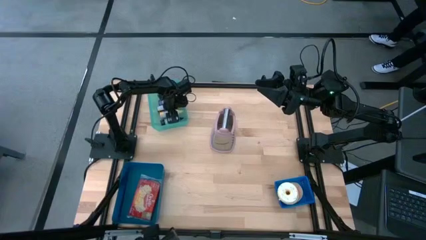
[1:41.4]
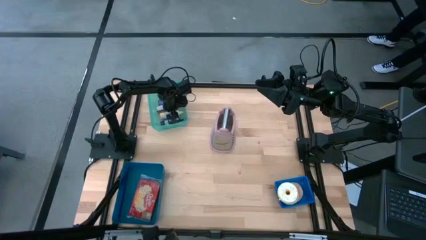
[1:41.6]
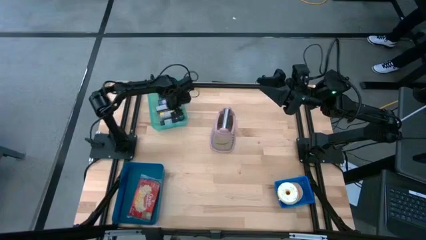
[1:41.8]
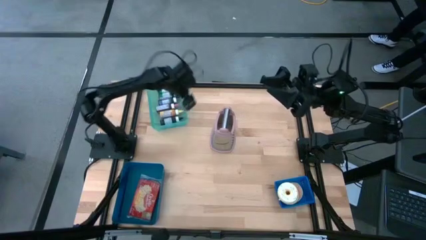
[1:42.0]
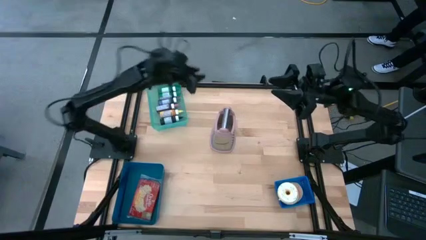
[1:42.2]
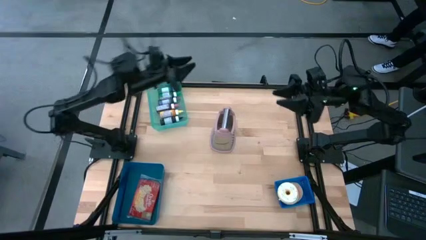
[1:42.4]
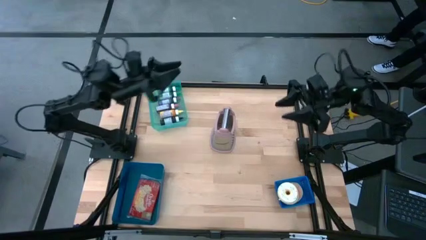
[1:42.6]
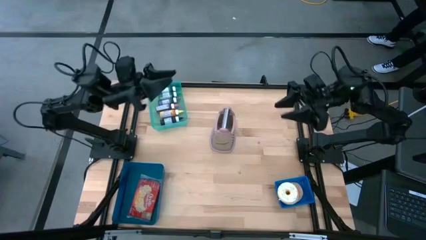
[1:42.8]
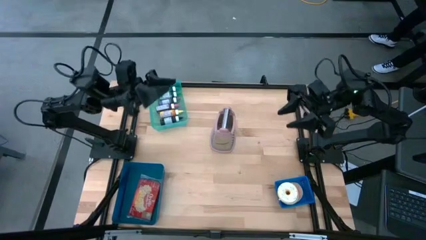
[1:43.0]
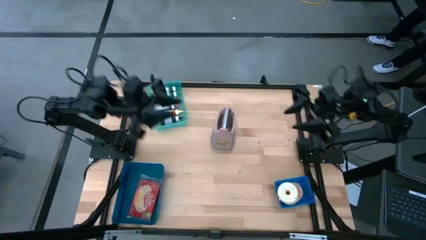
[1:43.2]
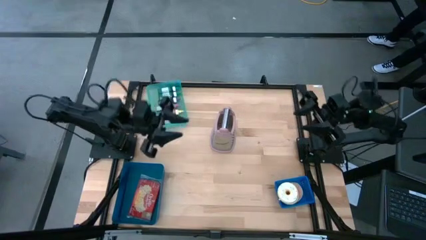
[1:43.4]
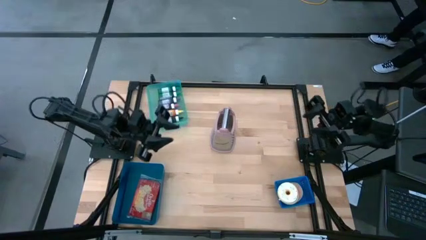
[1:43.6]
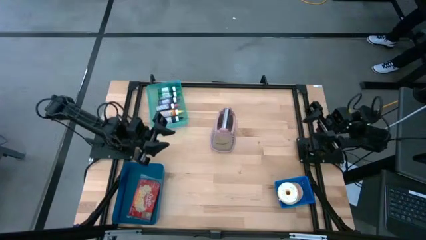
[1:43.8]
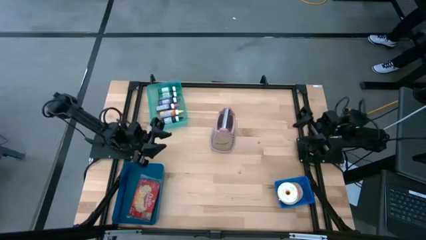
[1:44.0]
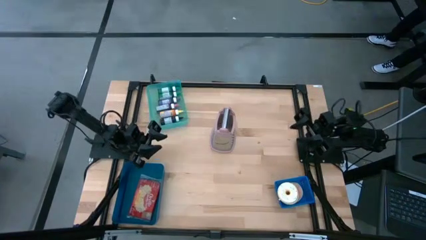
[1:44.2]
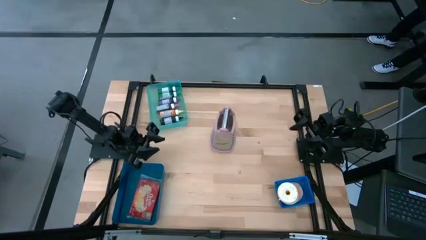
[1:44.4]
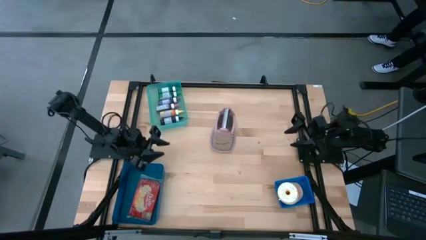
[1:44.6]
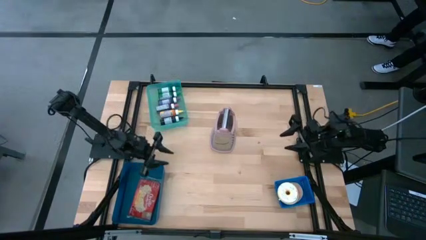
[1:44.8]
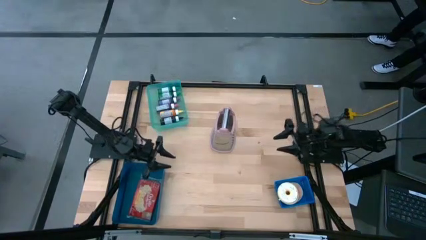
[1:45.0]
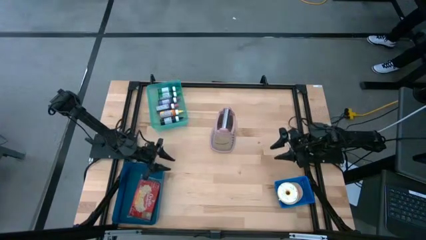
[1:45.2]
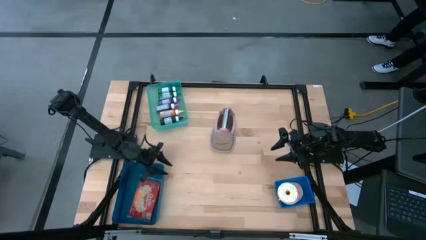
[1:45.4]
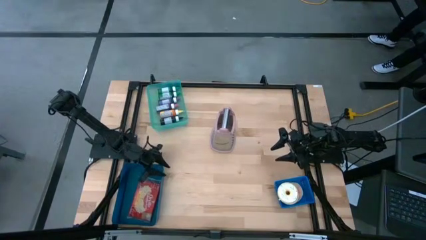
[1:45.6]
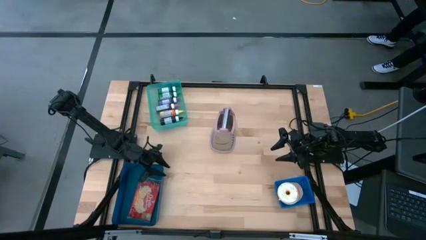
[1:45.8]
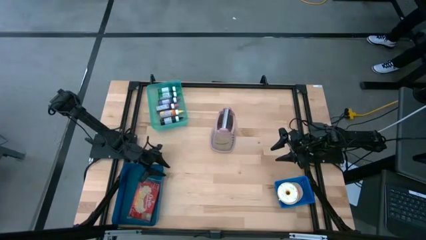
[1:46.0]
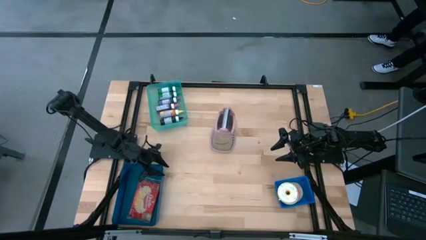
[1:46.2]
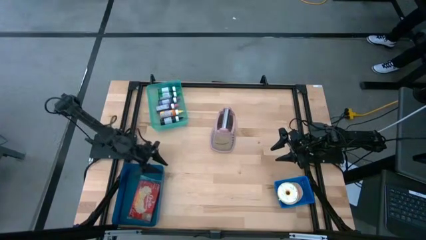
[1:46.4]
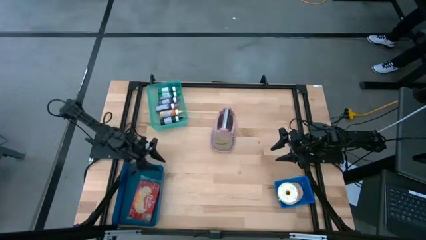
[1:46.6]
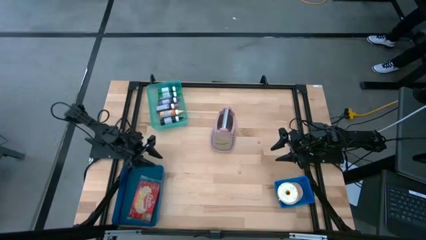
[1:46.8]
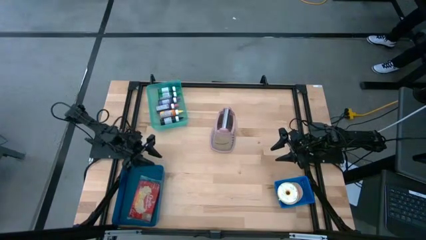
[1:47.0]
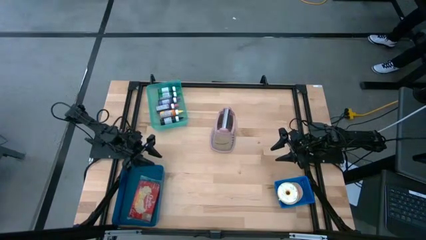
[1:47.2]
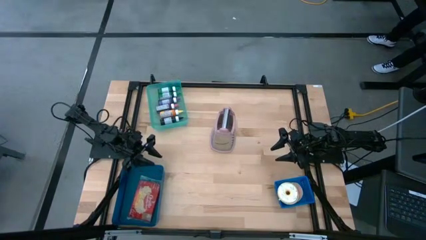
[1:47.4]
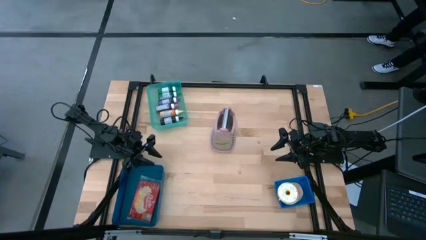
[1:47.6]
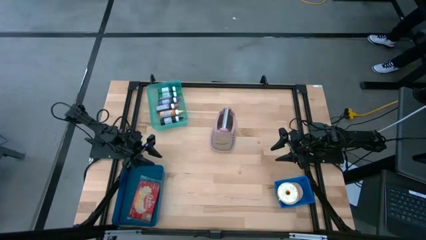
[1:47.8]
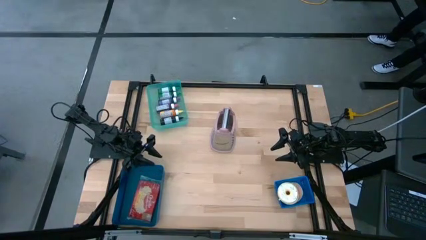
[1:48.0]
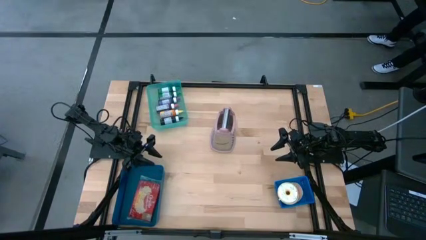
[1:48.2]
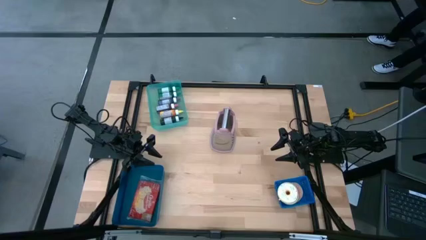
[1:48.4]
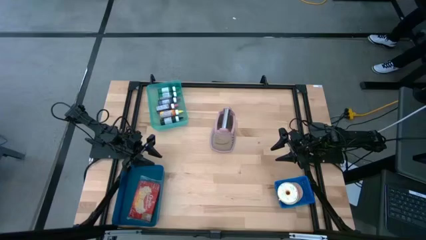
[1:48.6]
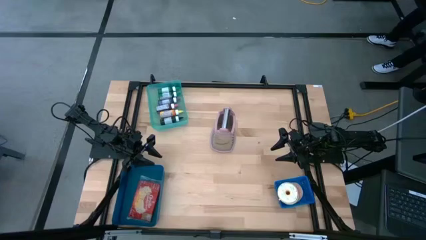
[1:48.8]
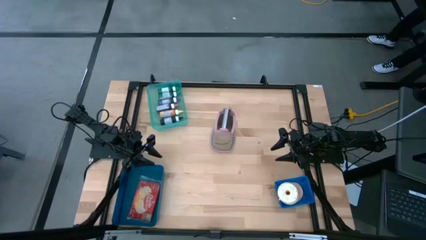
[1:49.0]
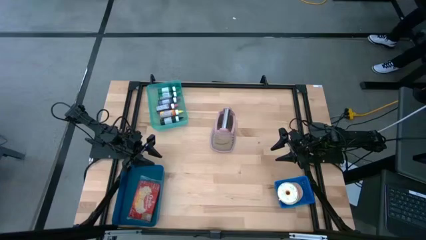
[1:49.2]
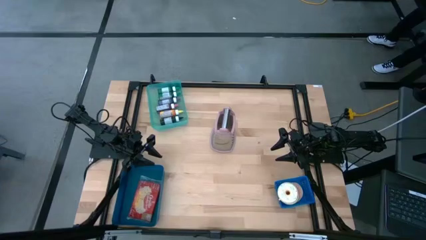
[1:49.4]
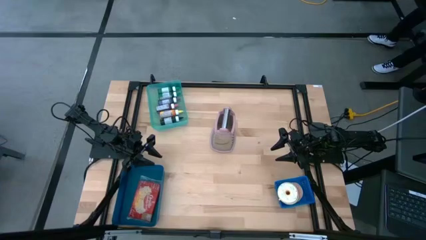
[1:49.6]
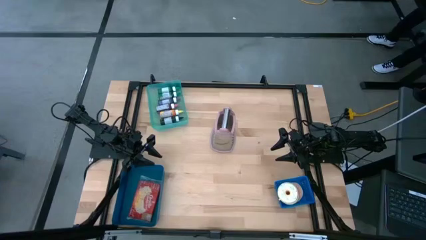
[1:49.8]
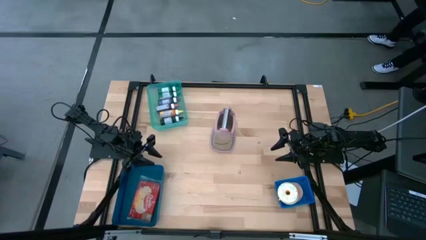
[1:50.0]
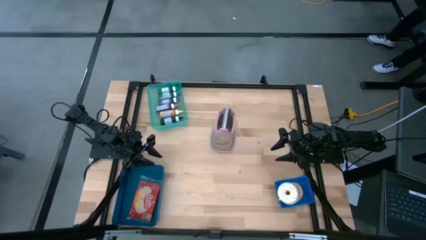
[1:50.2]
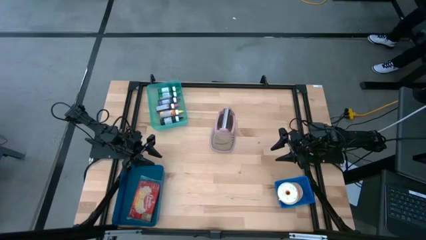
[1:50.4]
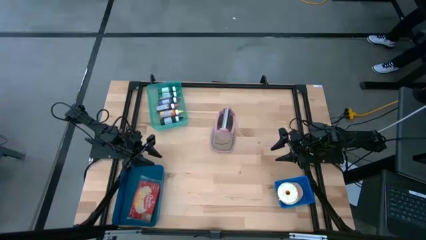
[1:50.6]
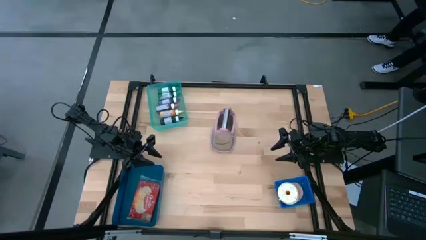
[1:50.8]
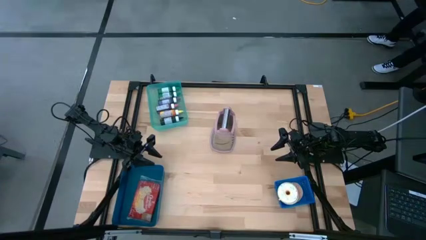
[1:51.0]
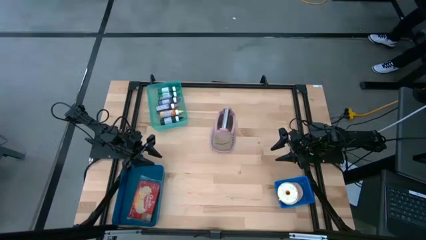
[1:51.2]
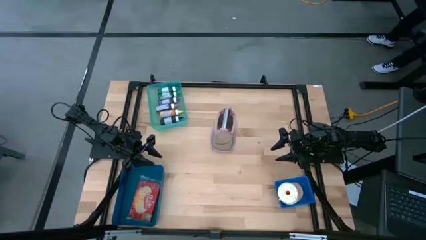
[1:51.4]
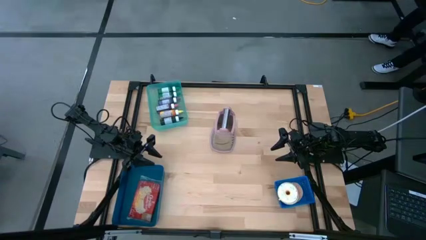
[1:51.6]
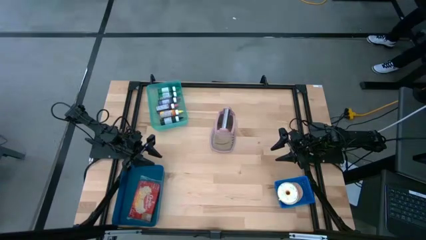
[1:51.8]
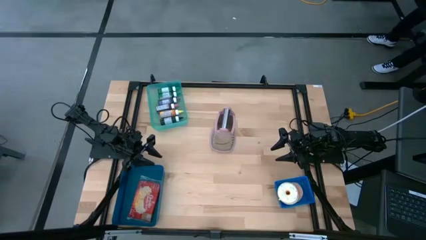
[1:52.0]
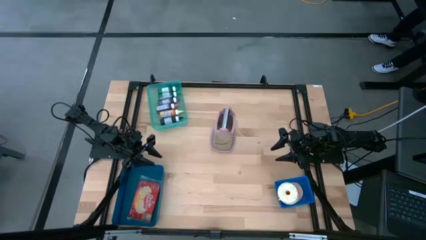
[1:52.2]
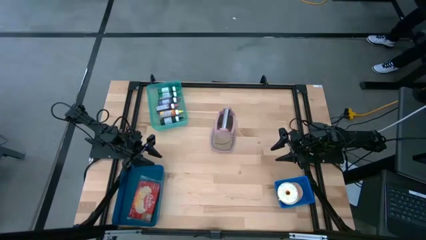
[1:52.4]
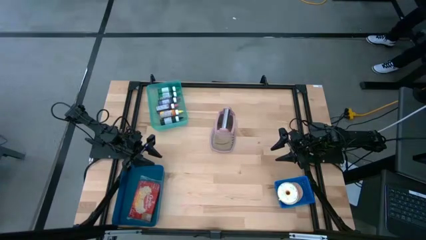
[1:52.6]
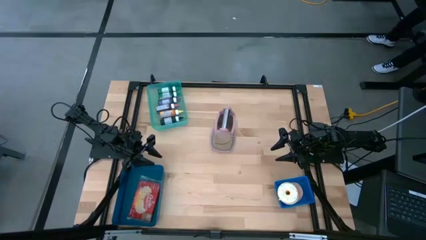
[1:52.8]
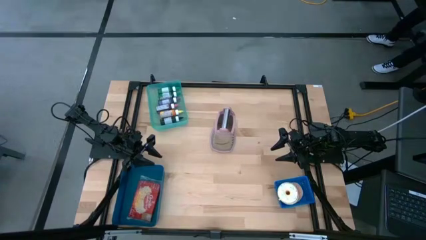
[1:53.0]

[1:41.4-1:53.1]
Return to Home Position

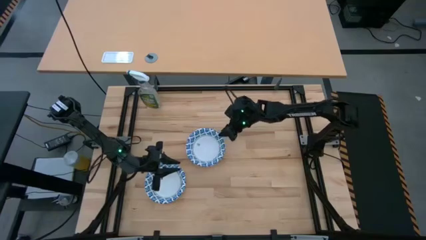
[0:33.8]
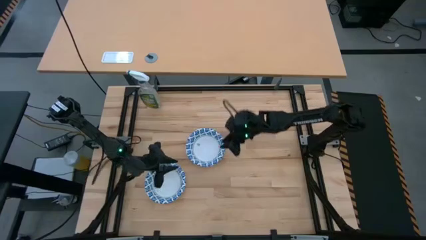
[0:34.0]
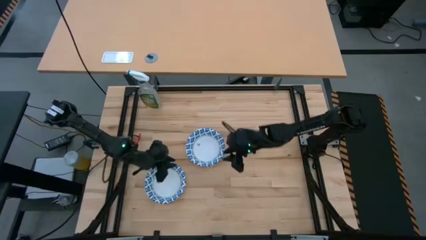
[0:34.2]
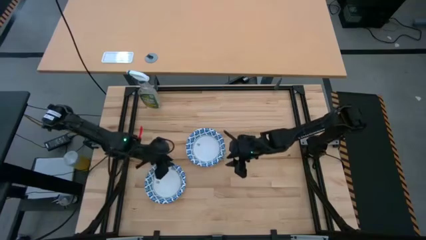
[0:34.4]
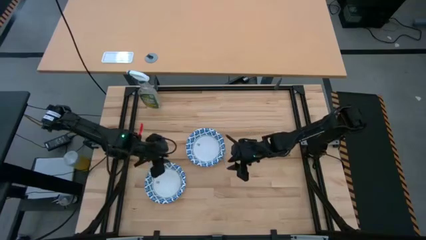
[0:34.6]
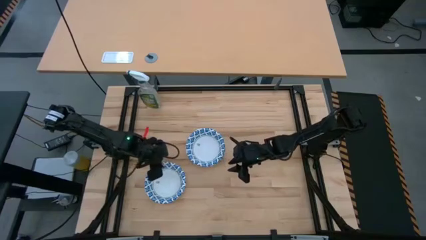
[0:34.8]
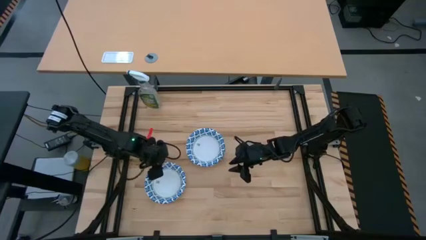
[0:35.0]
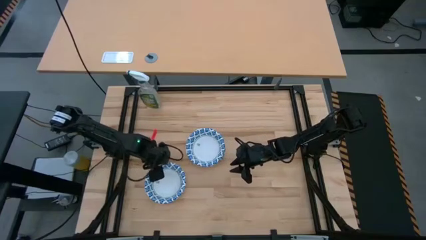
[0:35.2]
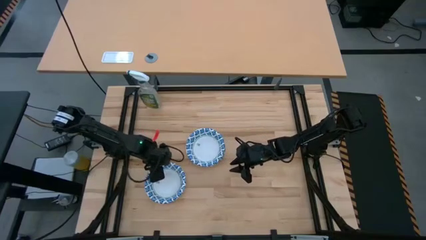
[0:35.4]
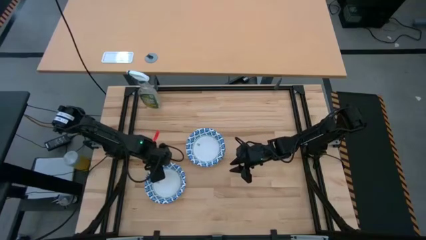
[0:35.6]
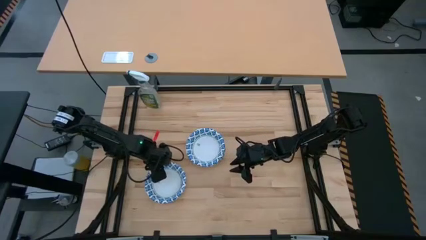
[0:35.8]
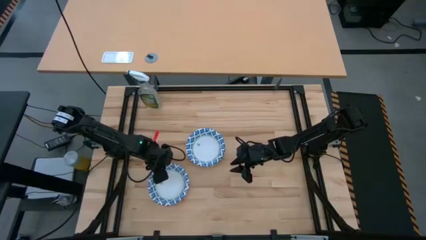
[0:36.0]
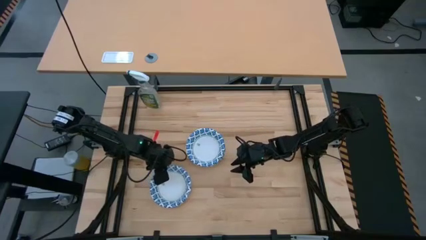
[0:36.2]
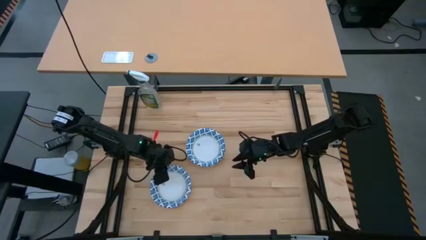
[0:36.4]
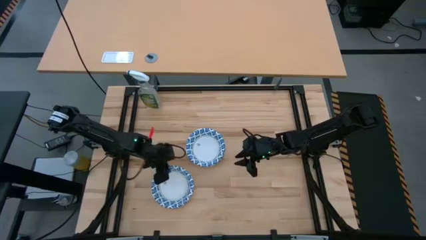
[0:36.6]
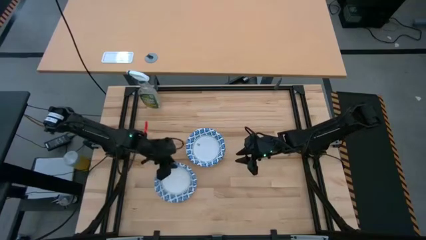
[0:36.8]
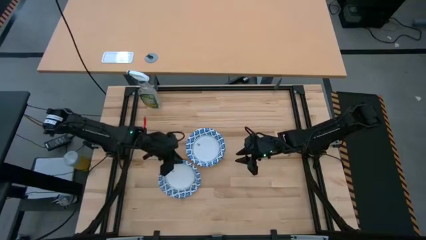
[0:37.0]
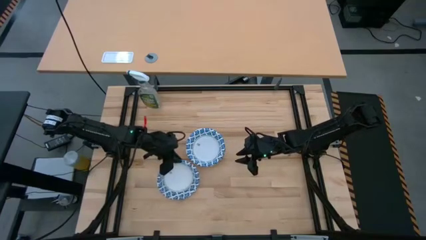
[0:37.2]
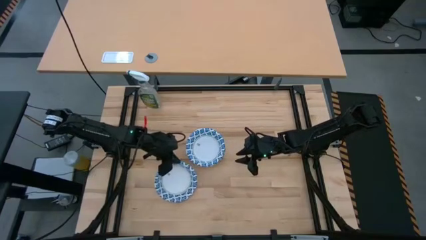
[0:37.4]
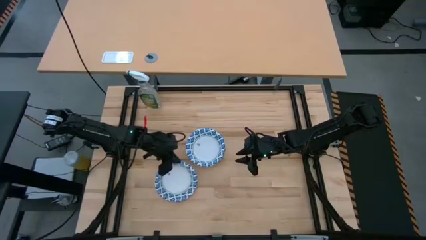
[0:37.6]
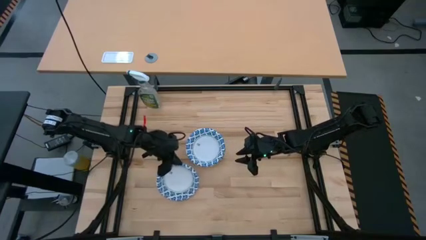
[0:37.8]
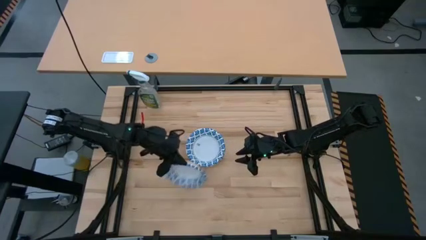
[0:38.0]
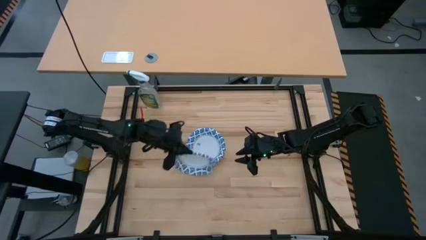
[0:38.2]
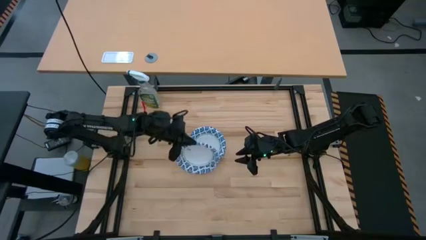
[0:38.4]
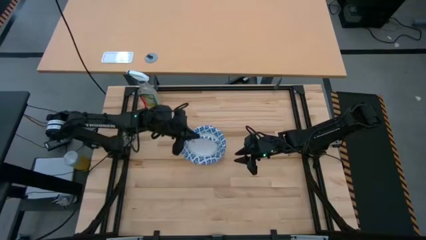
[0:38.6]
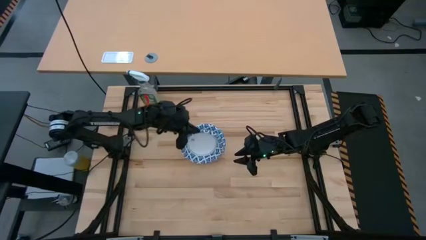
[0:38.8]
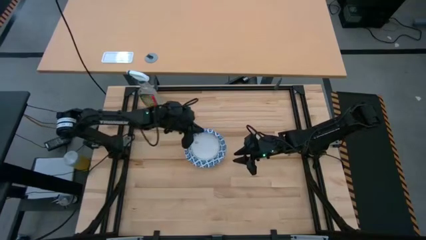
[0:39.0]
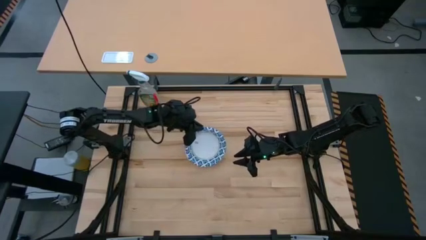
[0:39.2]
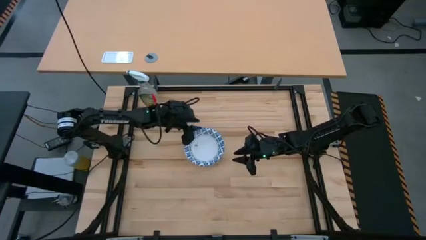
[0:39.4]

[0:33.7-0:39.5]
Put the white bowl on top of the white bowl
